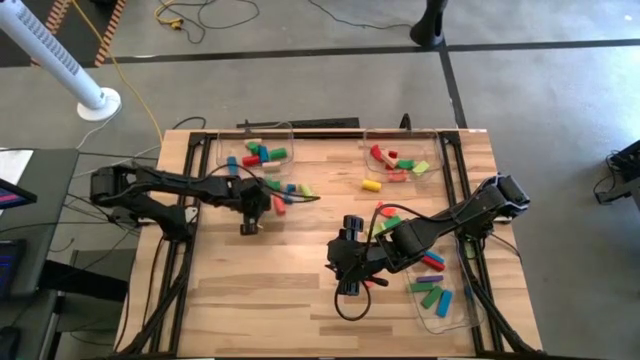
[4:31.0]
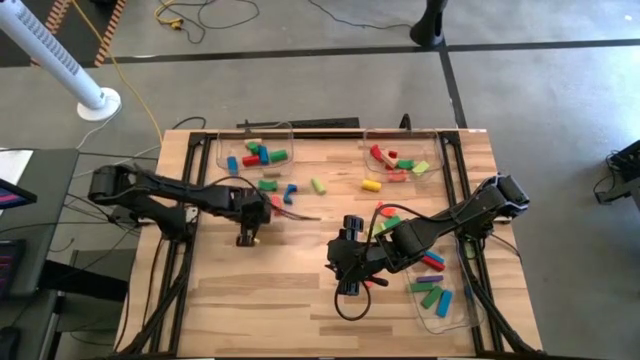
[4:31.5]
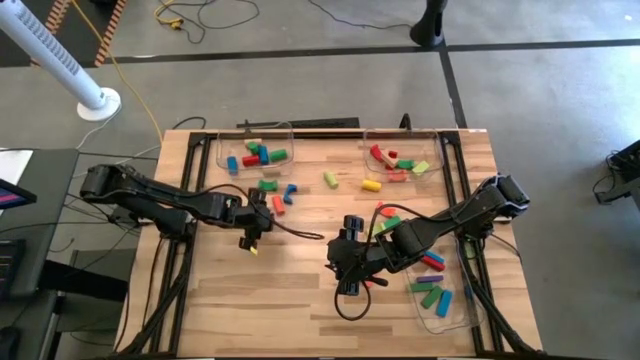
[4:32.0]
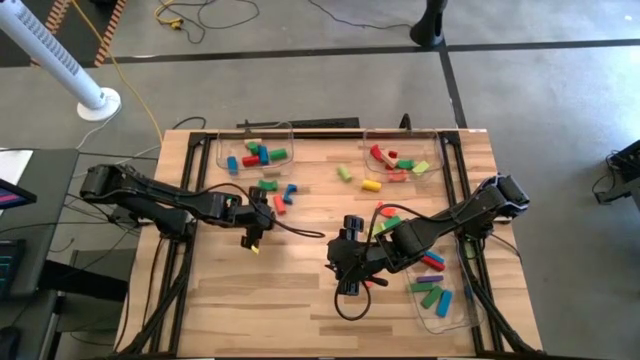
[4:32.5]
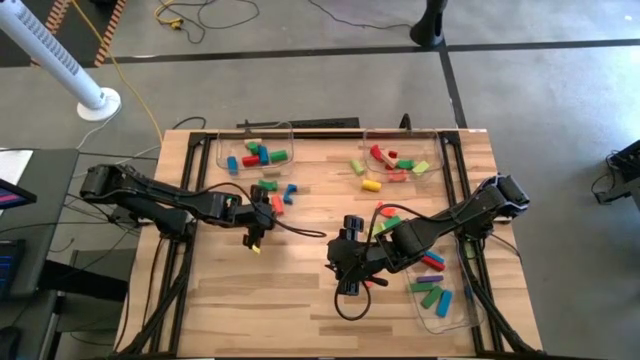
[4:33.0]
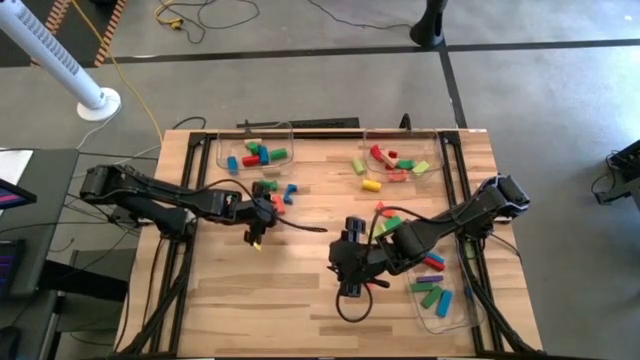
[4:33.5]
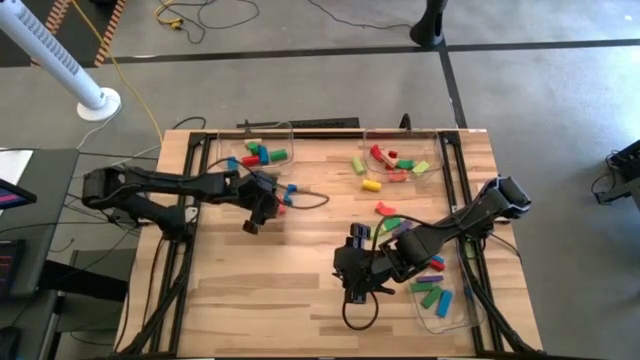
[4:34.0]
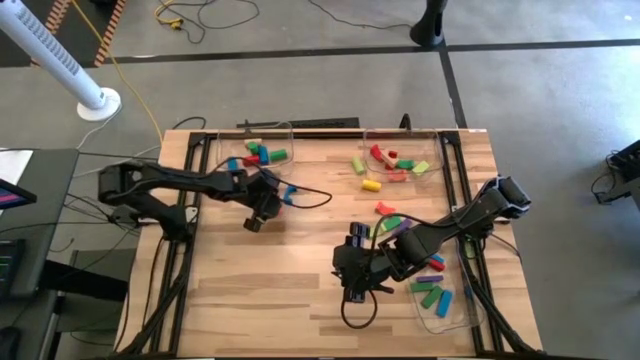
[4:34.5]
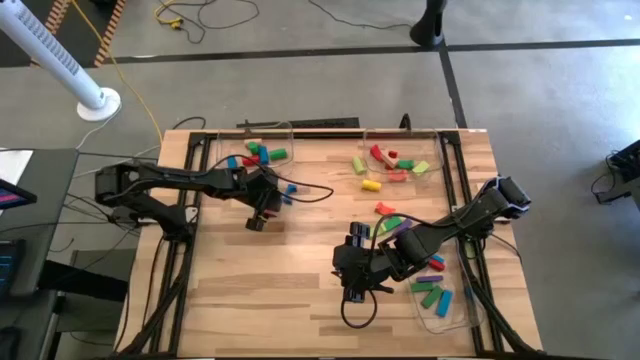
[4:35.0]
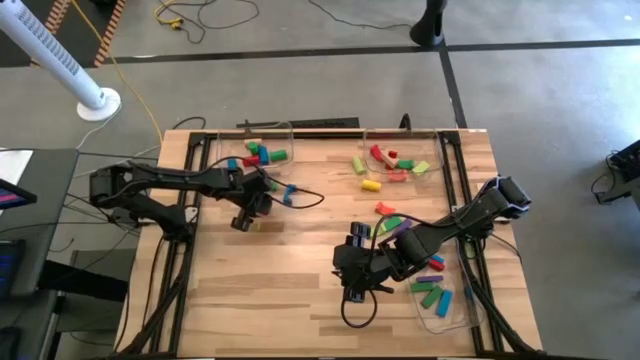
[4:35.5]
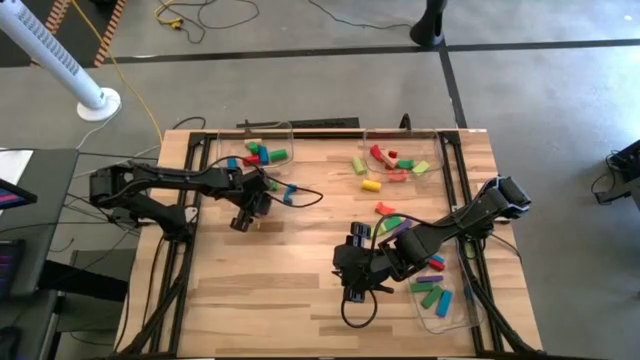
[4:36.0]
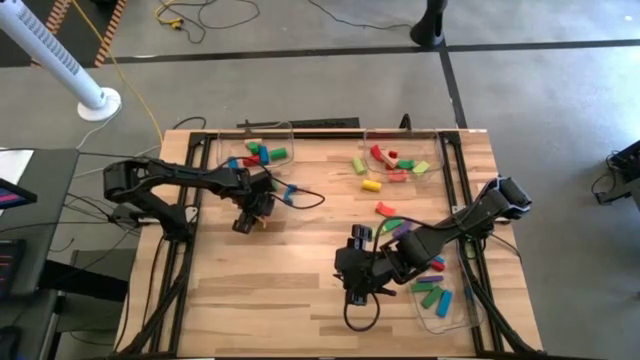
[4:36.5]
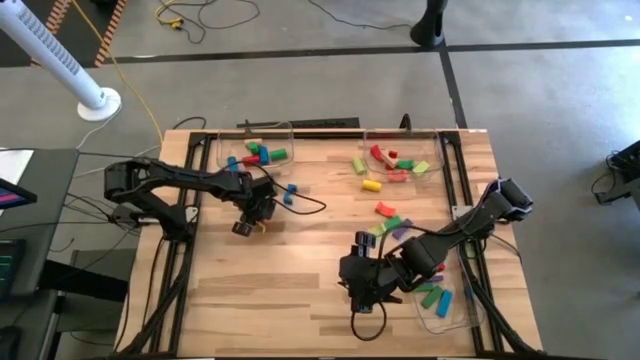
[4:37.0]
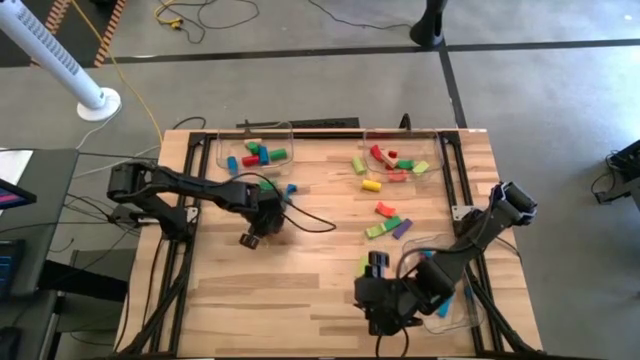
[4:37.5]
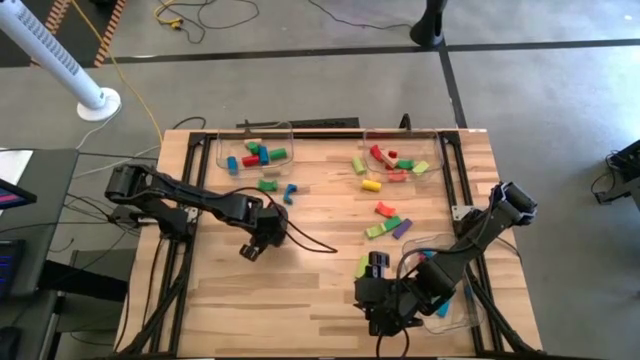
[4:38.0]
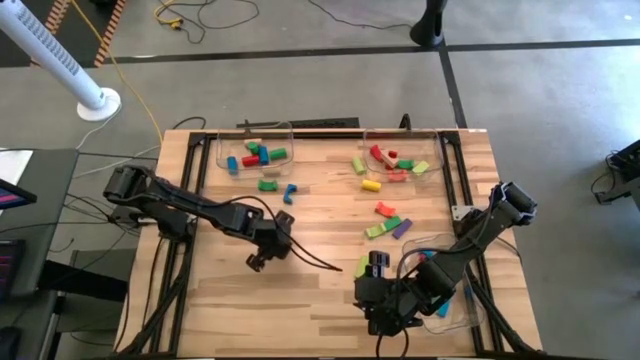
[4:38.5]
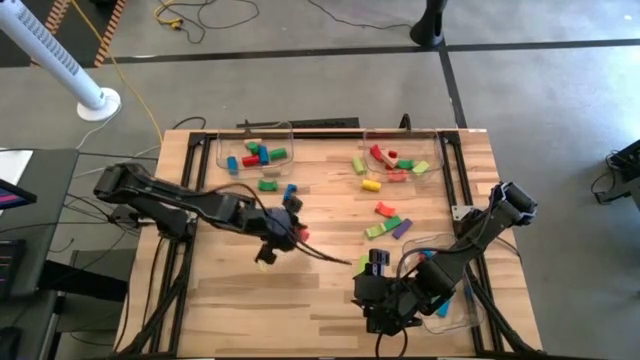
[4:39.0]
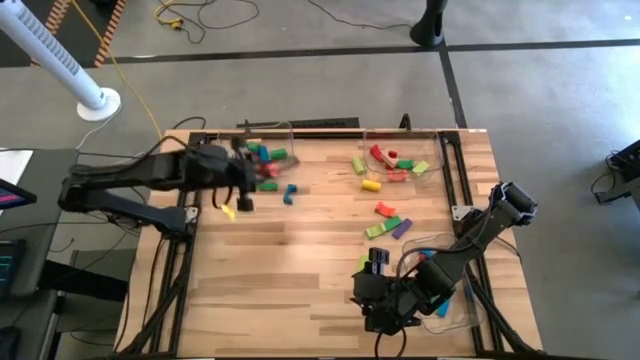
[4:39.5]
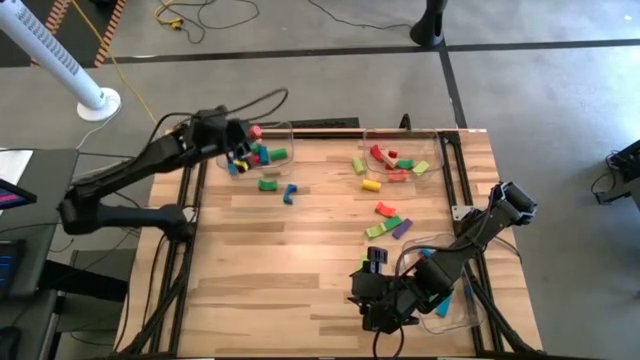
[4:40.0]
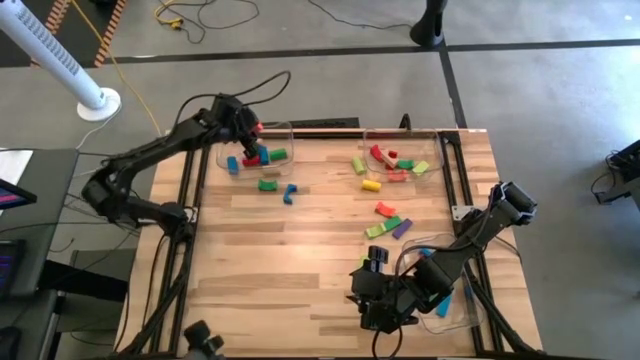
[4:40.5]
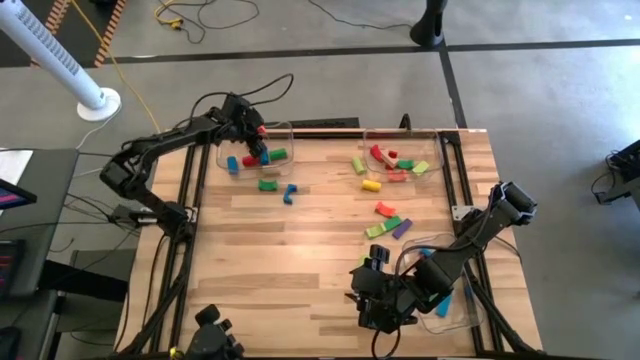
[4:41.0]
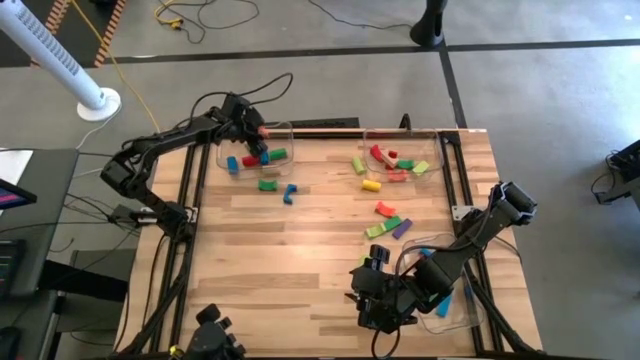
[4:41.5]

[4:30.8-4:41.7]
Task: Sort blocks by size
Put the orange cylindrical block into the top left transparent bin

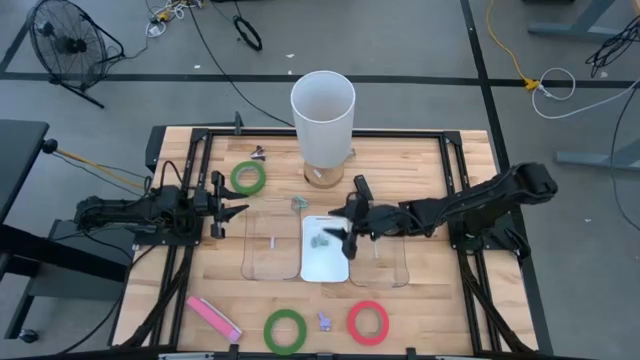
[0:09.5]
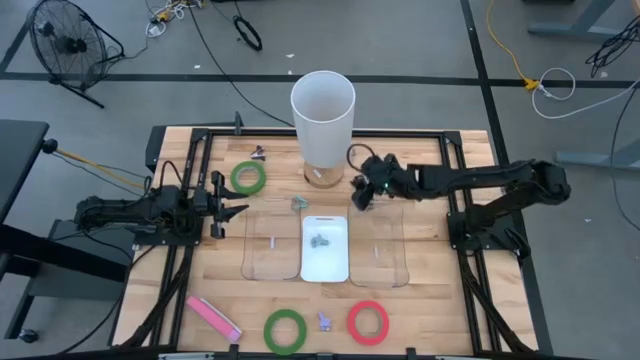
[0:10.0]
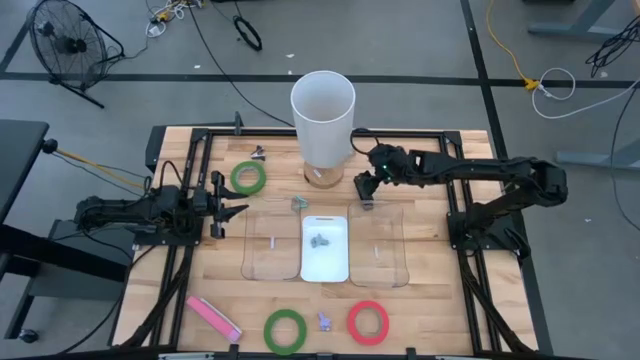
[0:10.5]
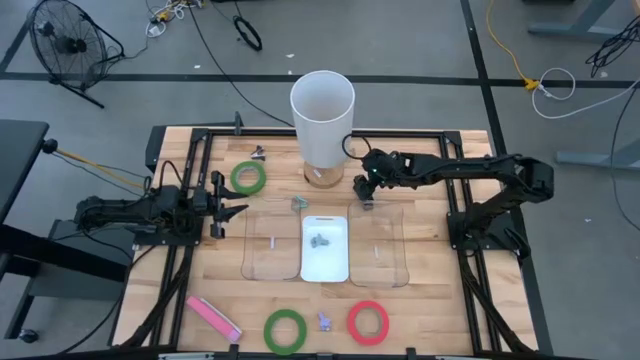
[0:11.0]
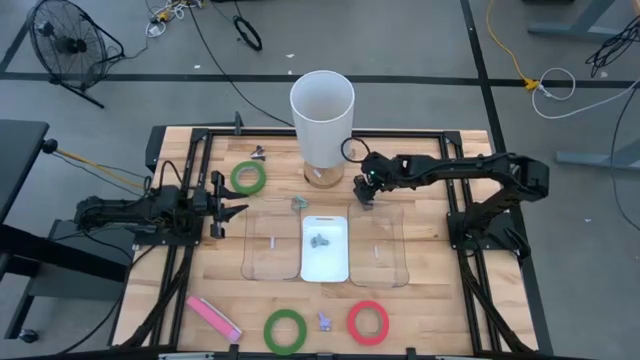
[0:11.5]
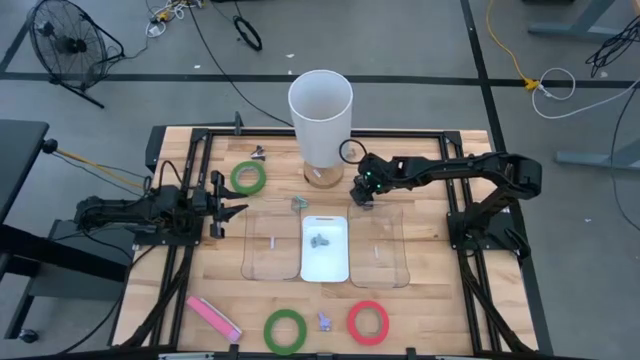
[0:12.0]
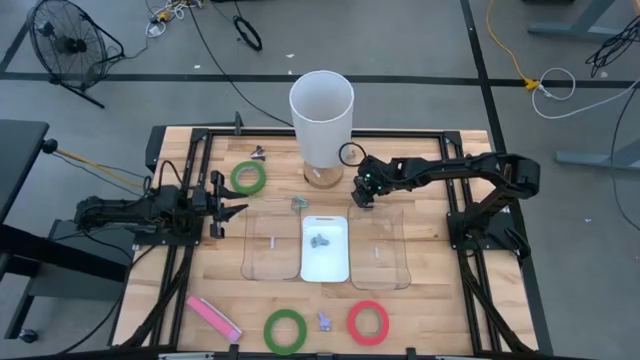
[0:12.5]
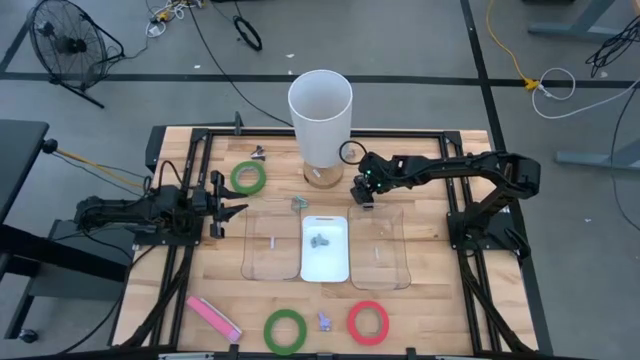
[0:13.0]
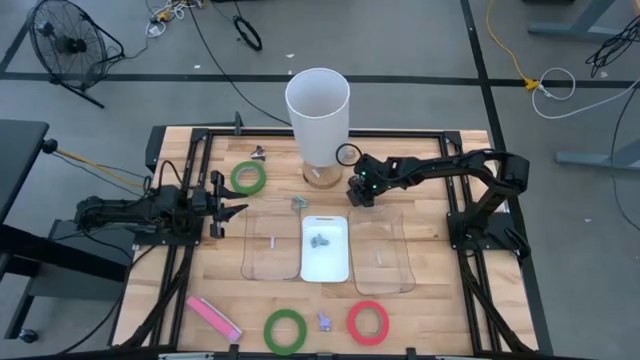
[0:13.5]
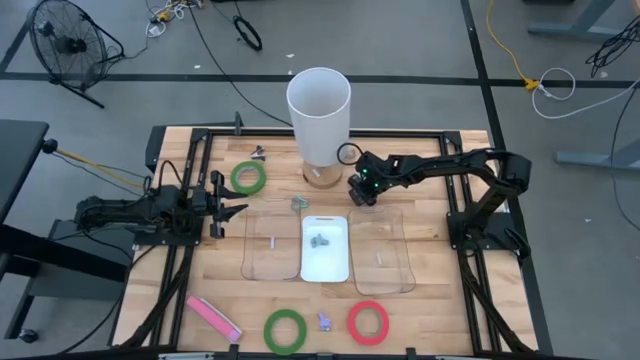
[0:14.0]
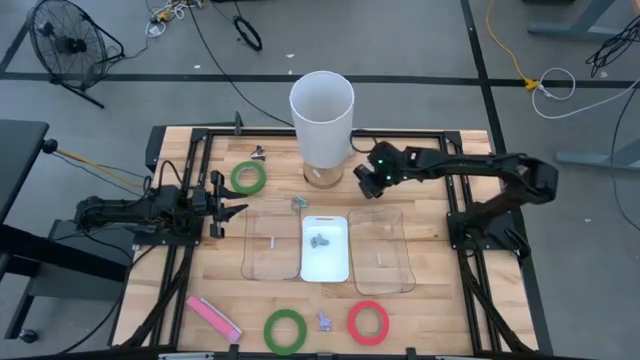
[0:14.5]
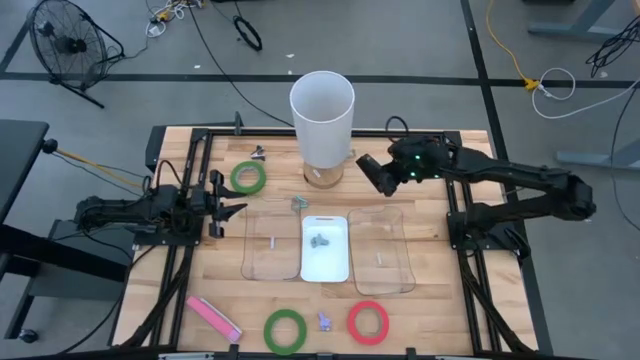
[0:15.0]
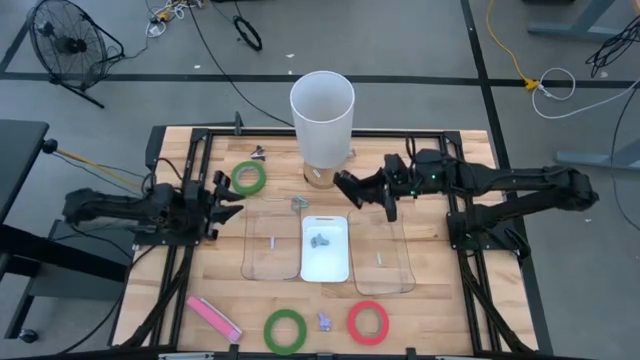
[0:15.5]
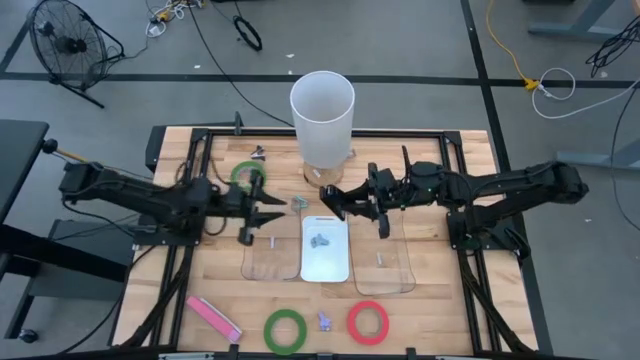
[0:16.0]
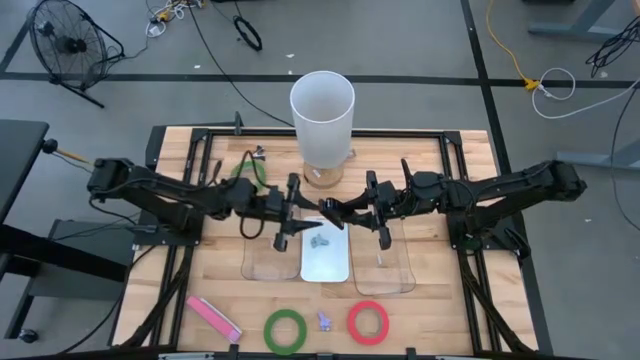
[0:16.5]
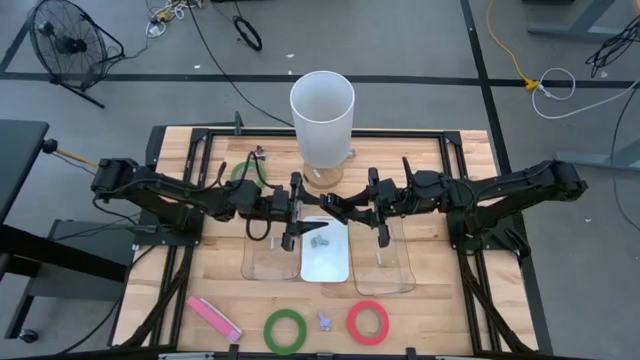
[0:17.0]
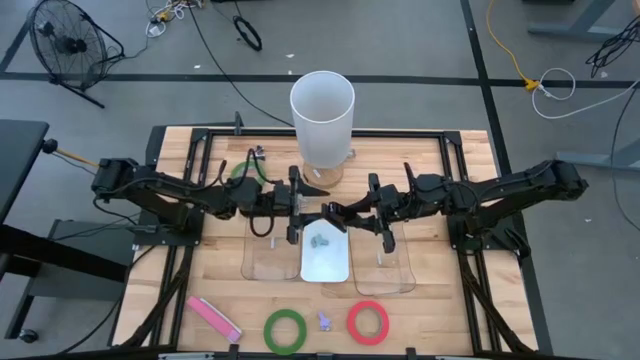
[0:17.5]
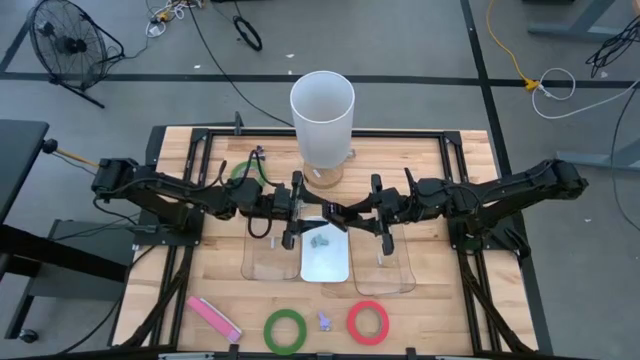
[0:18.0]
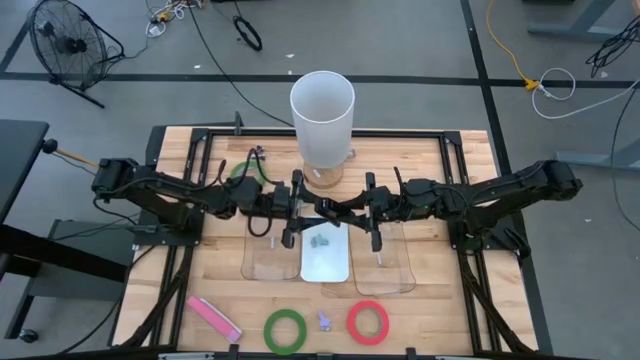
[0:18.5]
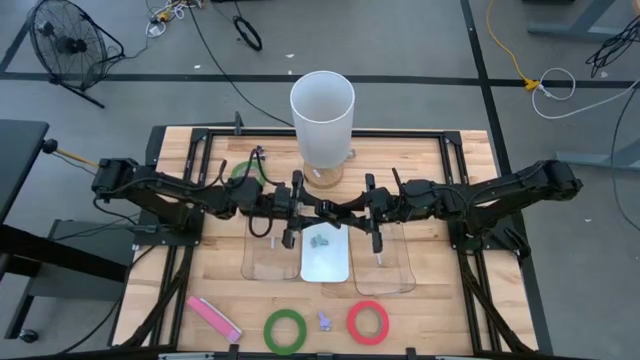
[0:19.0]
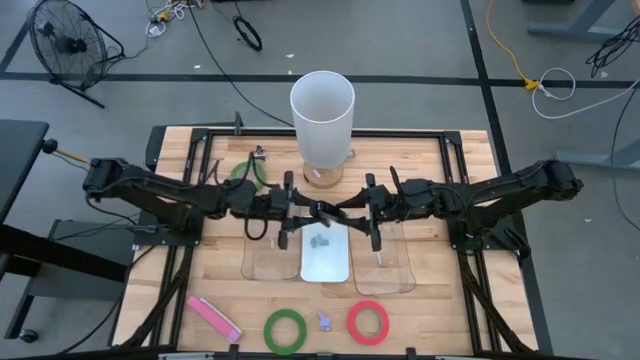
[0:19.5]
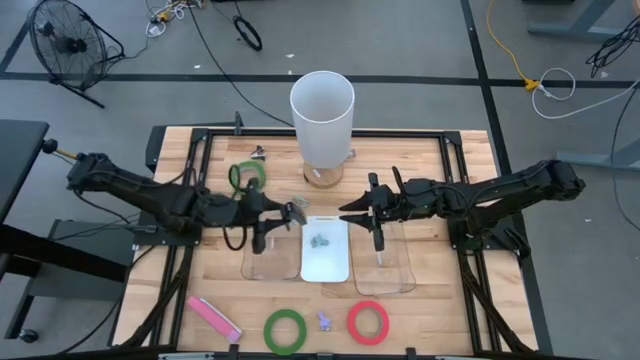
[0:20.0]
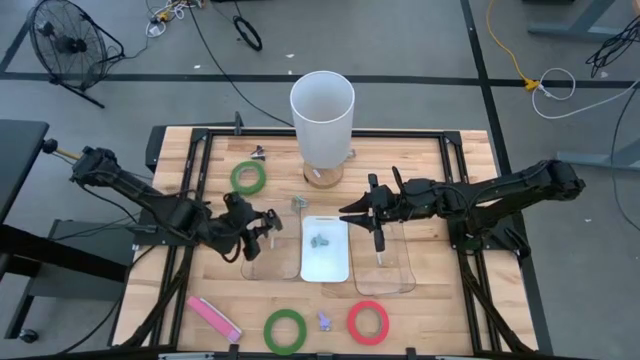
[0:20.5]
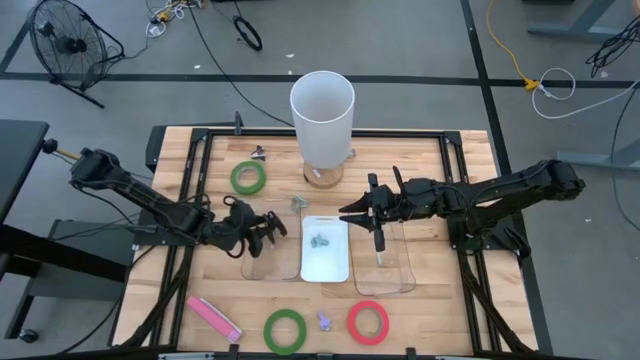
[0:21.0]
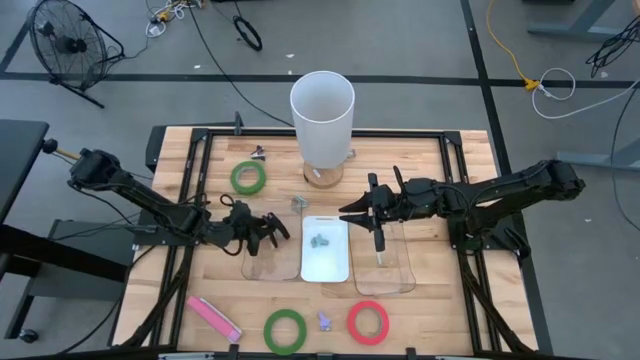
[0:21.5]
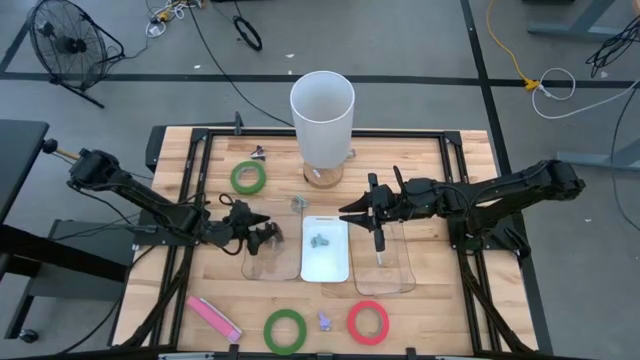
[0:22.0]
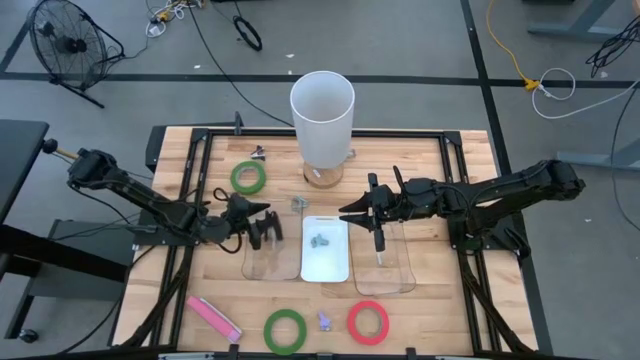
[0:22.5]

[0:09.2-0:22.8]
Task: Pick and place Stapler, Stapler remover, tape
Put the black stapler into the left transparent bin
